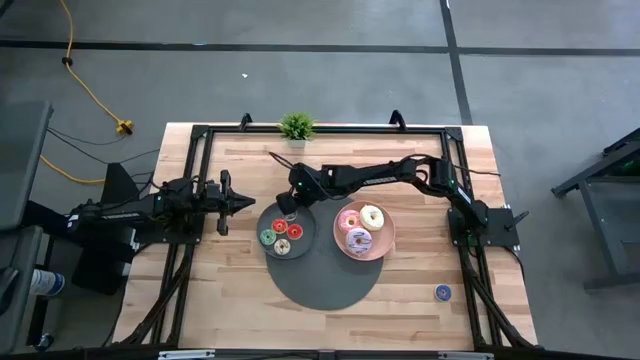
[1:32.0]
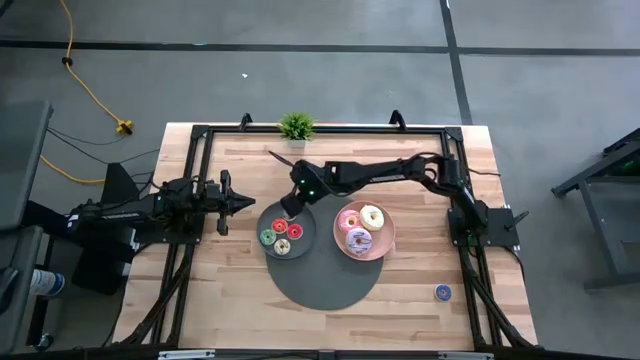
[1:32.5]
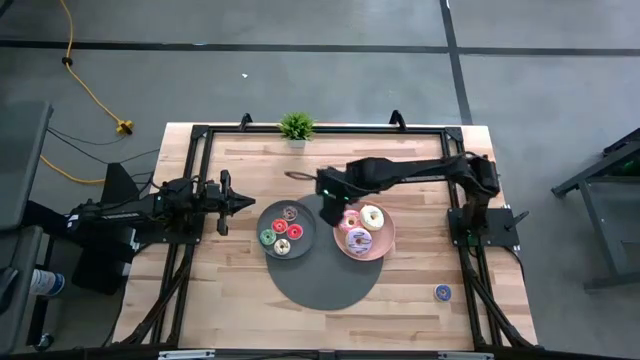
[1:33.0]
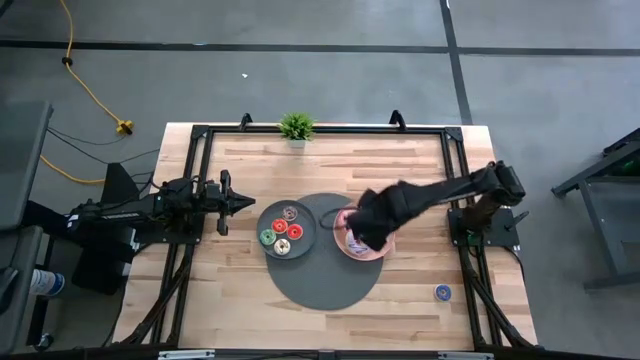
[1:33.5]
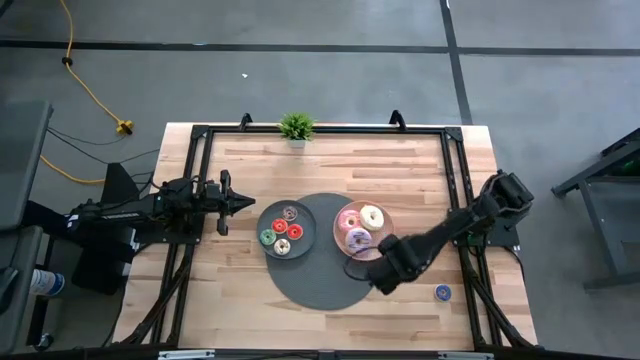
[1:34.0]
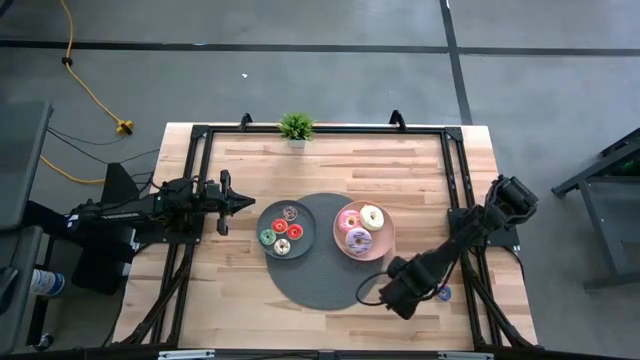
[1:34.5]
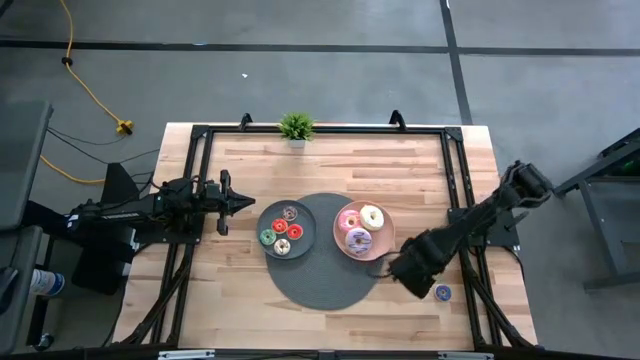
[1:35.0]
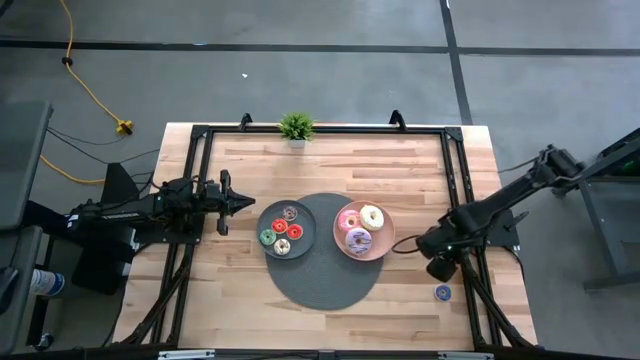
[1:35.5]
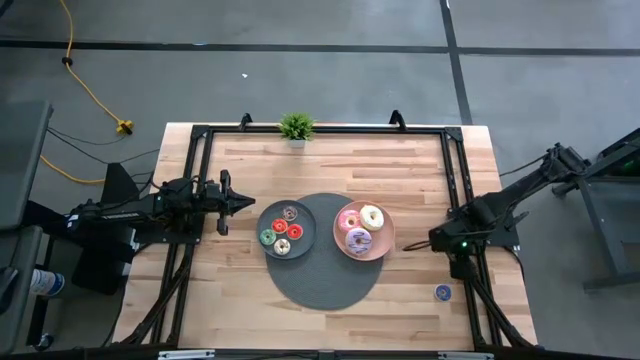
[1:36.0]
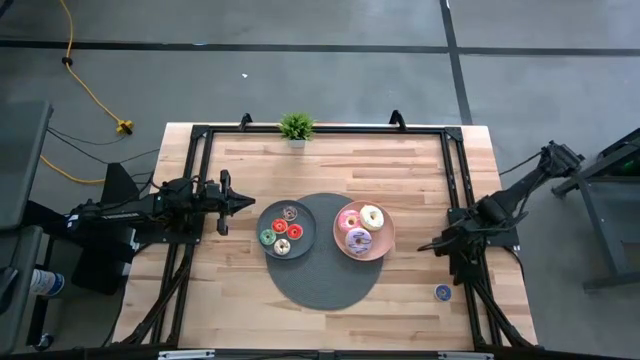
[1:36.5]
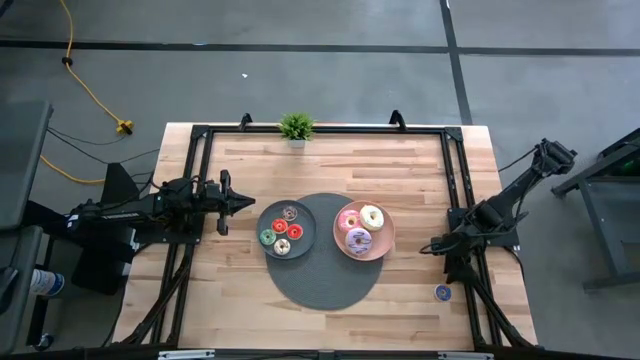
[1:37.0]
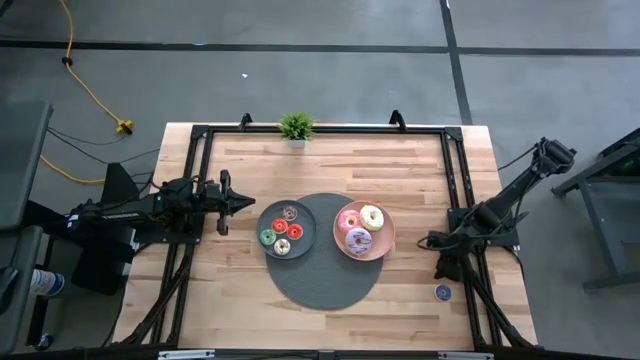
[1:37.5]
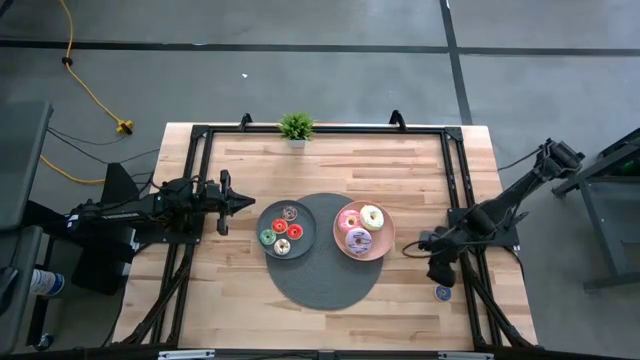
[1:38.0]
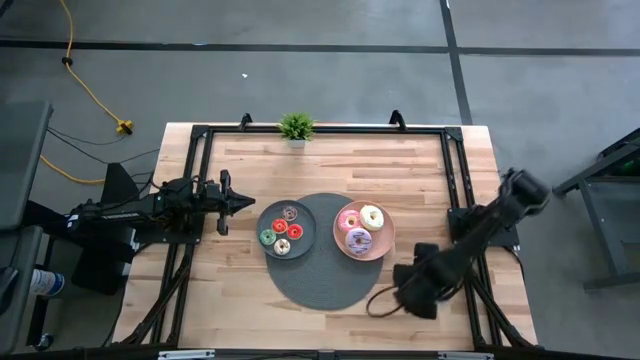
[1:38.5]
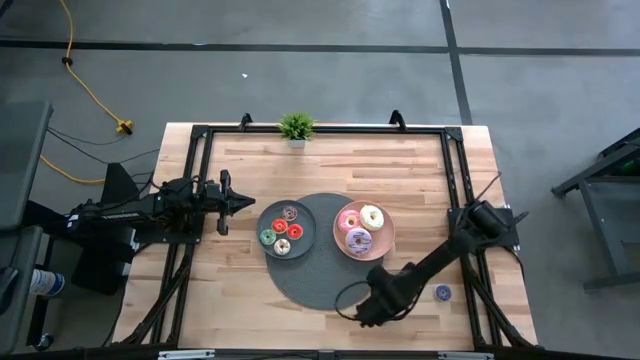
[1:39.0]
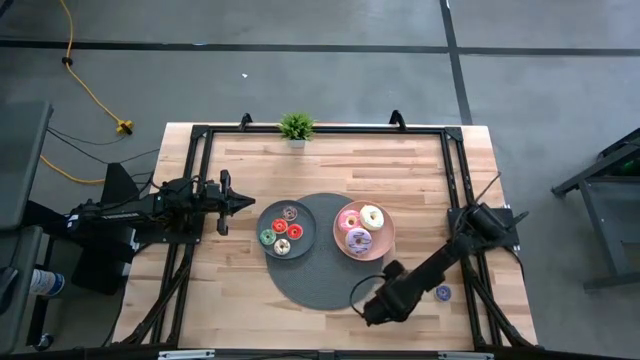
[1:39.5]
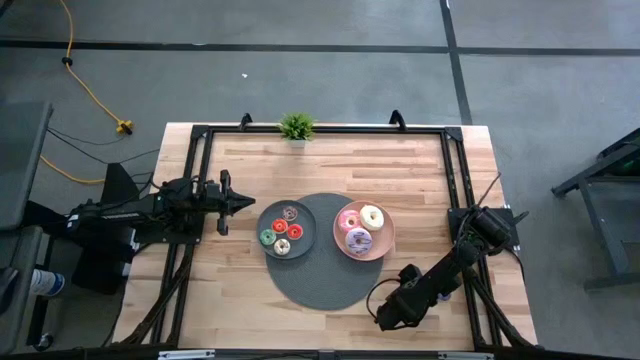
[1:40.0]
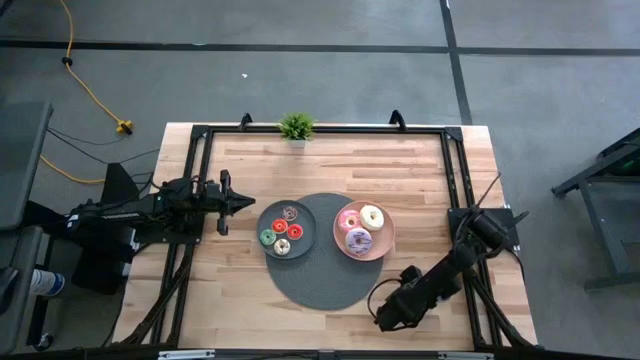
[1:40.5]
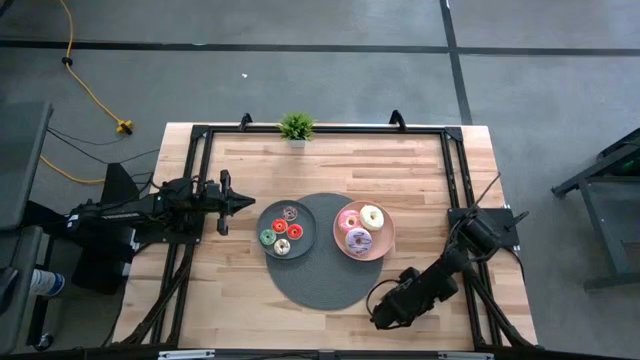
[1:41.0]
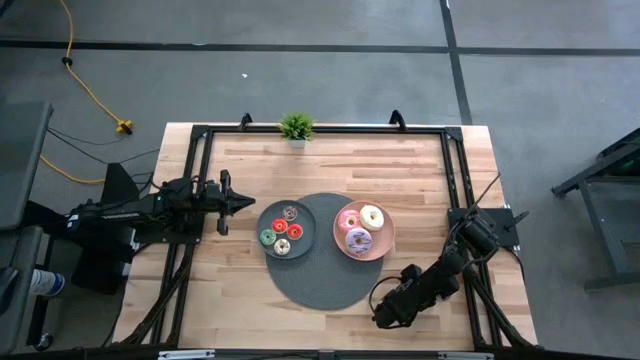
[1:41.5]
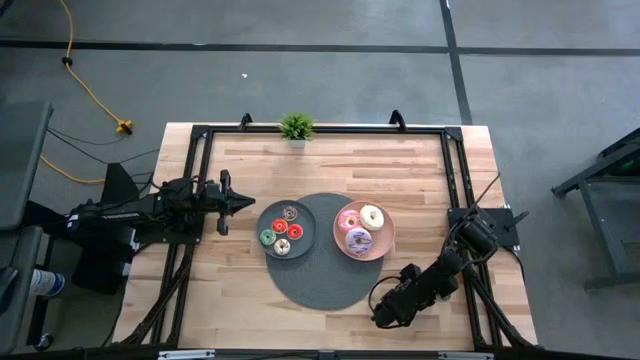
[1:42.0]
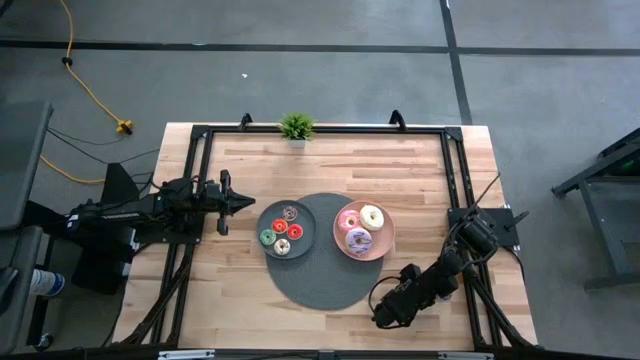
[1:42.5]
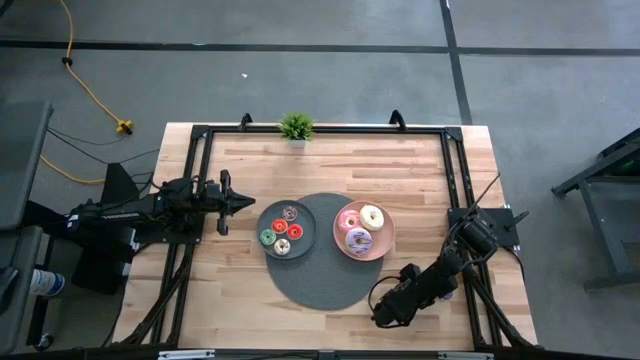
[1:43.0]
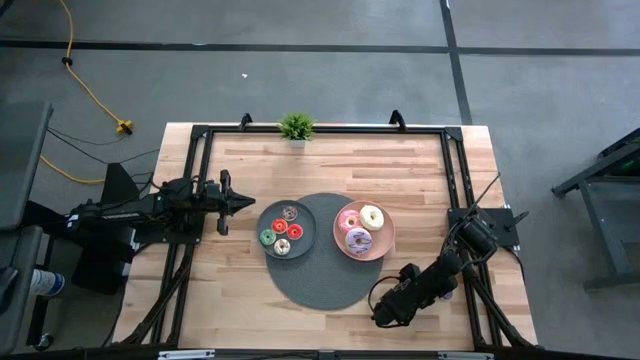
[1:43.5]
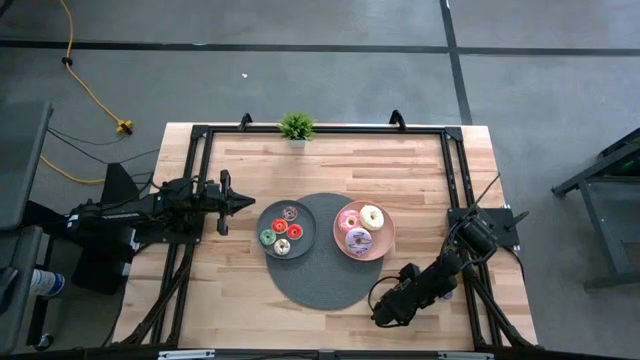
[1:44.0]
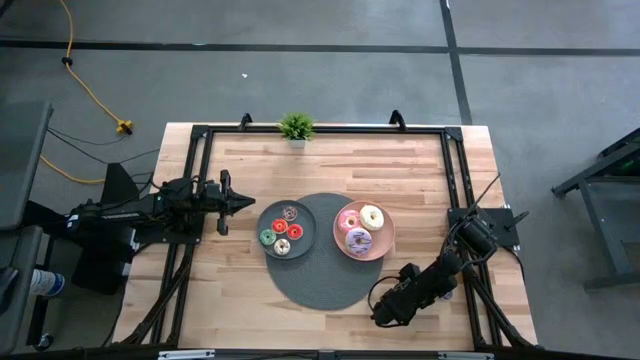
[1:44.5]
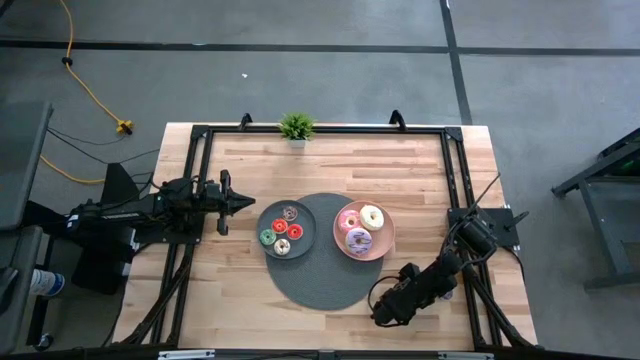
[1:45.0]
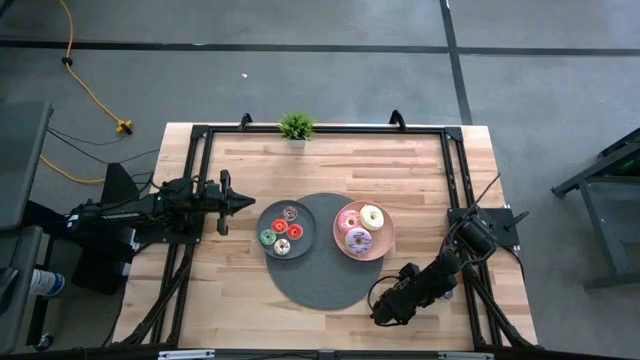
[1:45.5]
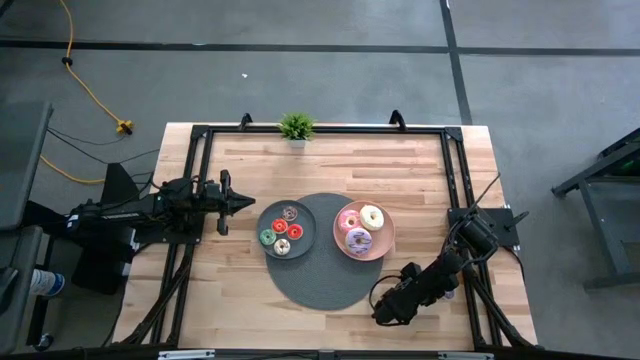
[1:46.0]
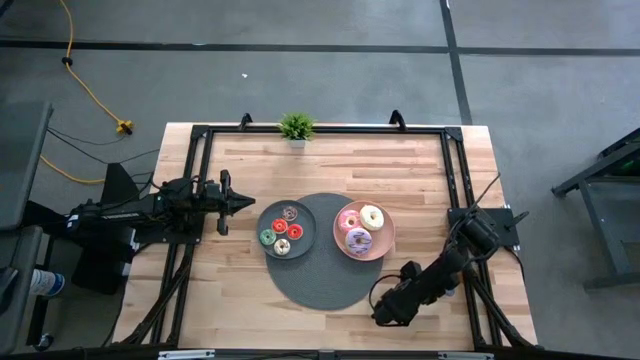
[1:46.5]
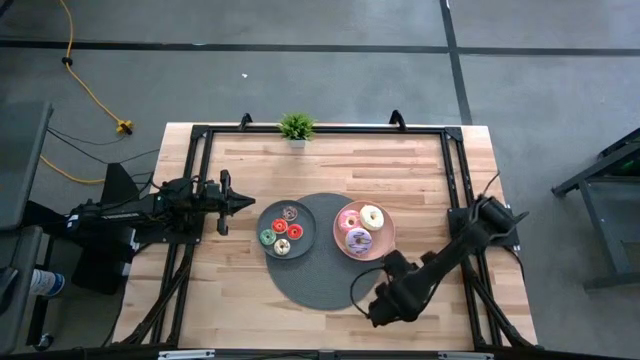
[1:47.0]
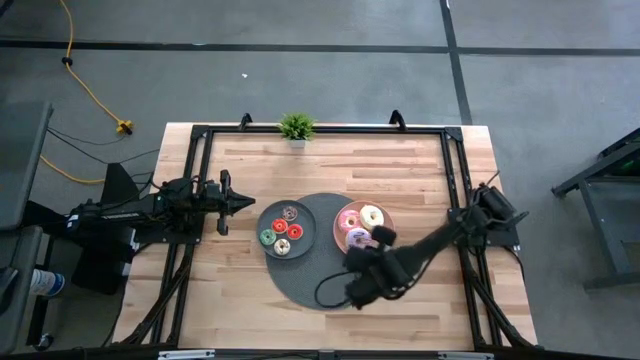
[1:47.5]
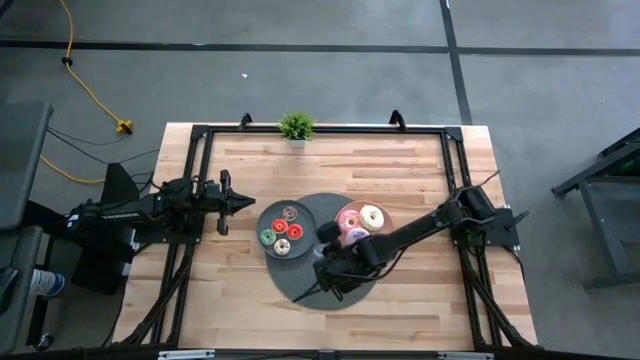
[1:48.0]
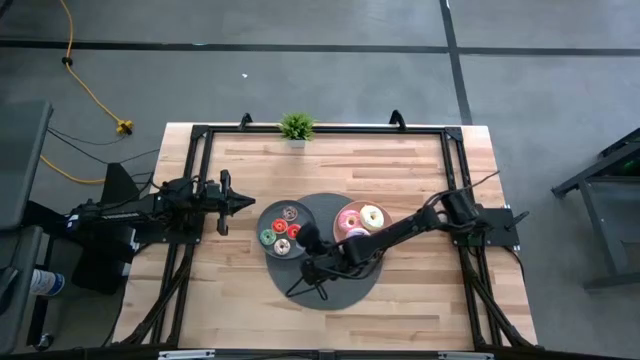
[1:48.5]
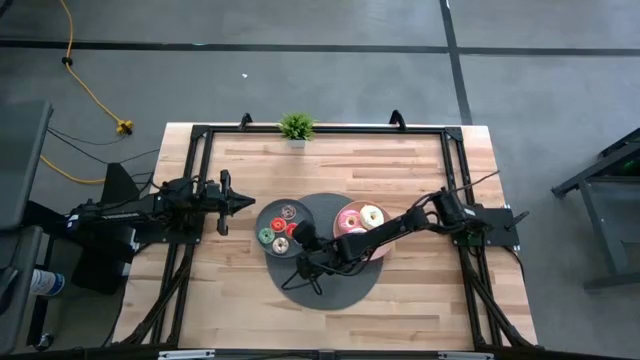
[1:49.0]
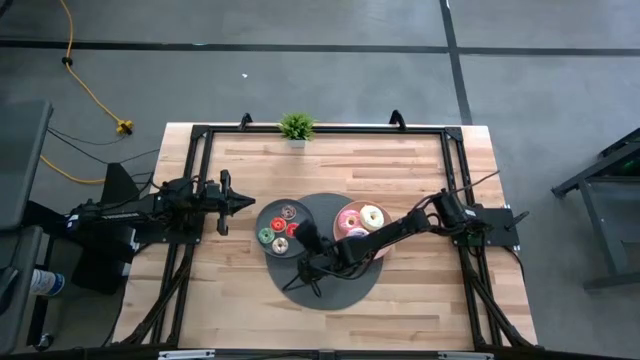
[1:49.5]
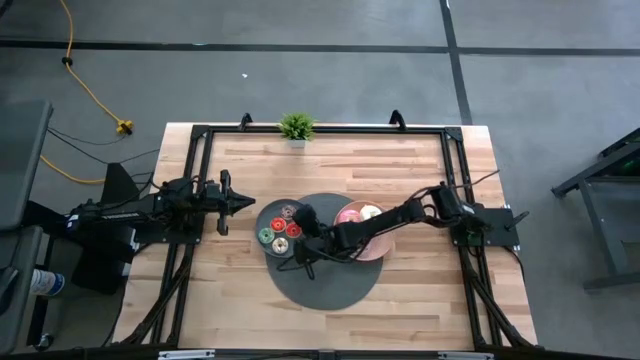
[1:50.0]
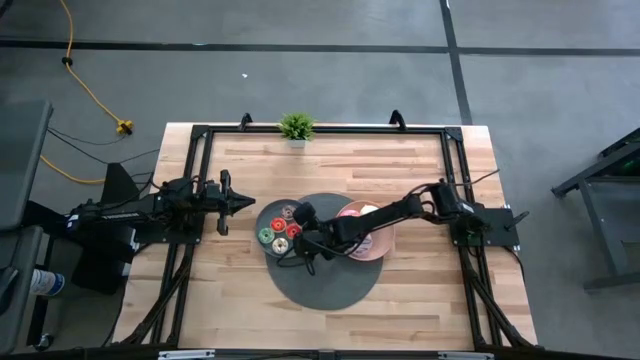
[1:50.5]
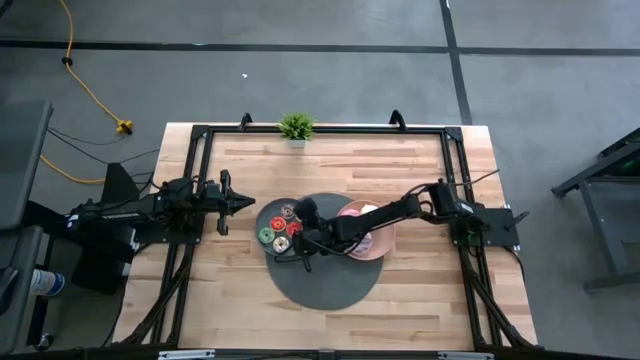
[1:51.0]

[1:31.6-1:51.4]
Task: Pick & Place donuts
Put the small blue donut on the gray plate

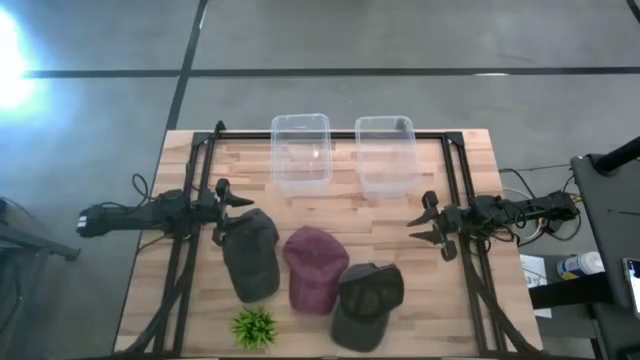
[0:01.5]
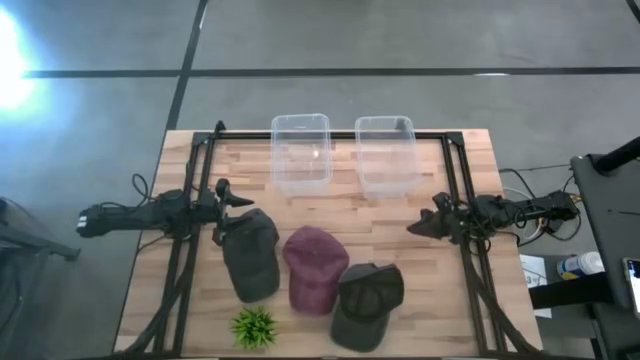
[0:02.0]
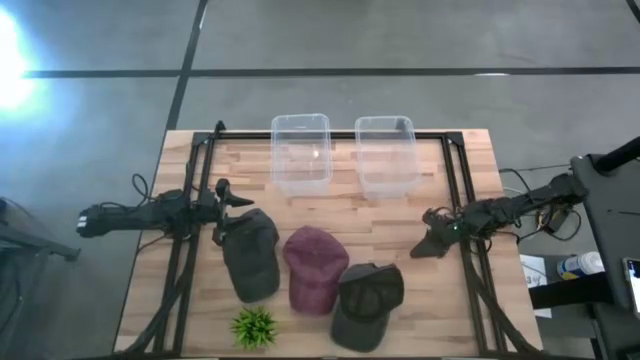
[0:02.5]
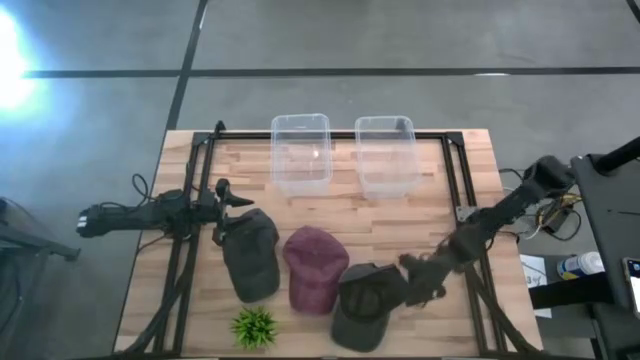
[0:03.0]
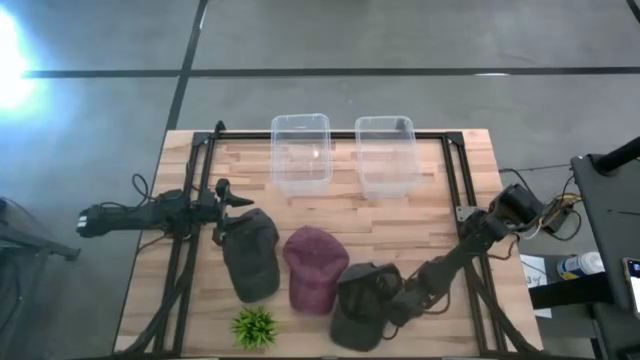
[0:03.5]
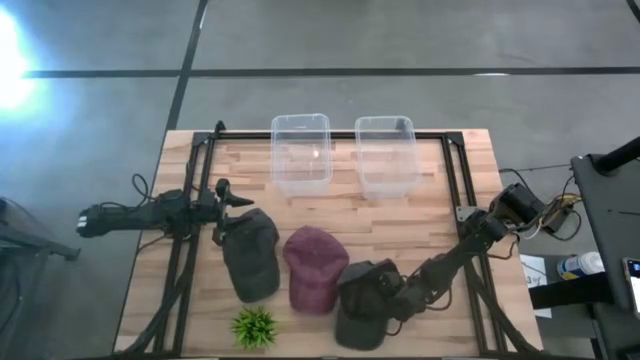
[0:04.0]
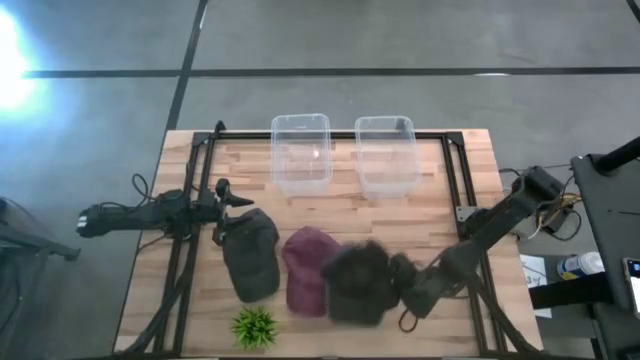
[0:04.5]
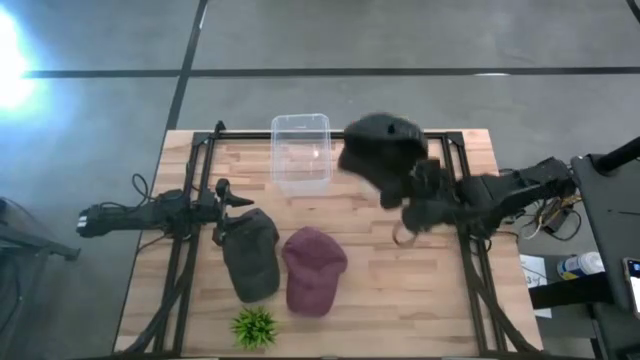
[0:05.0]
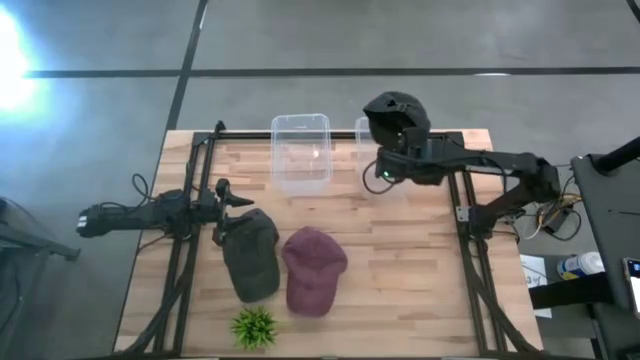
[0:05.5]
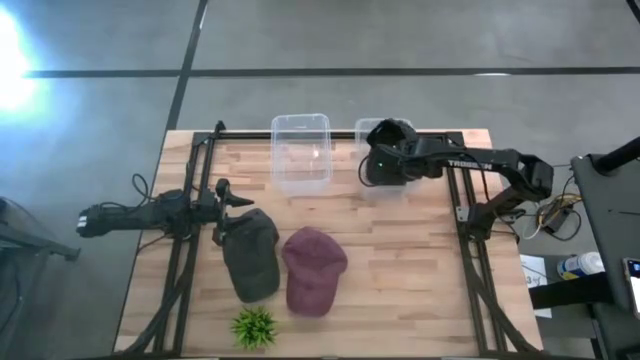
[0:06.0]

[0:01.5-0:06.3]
Task: Pick & Place hat
Put the right black cap into the right transparent bin
